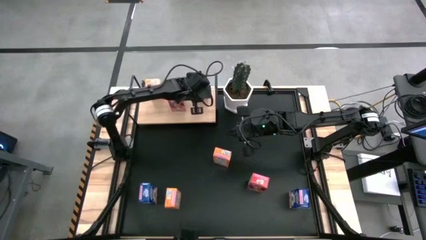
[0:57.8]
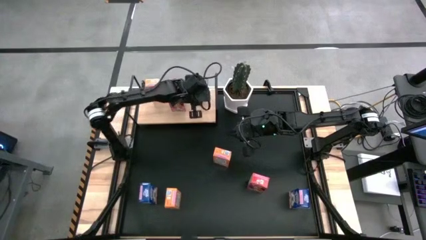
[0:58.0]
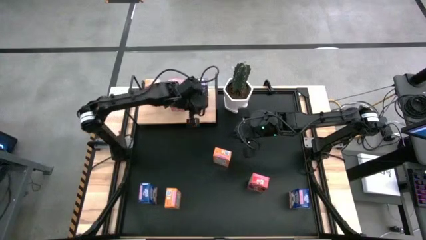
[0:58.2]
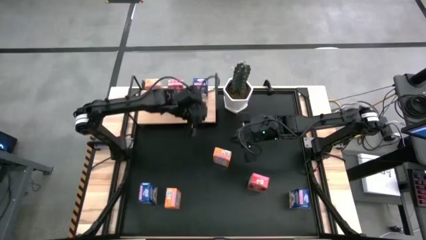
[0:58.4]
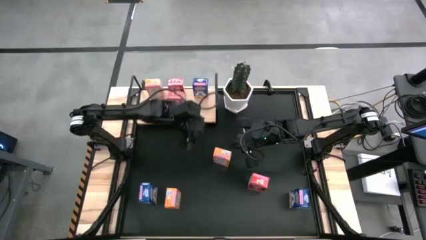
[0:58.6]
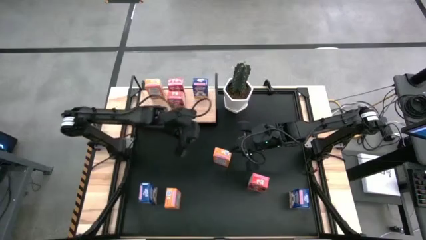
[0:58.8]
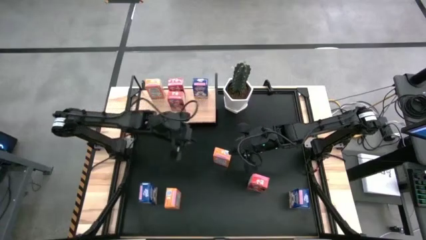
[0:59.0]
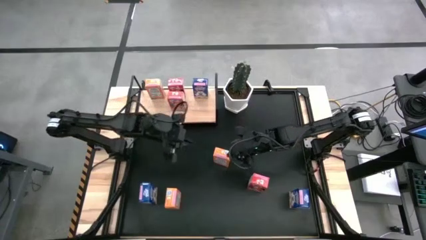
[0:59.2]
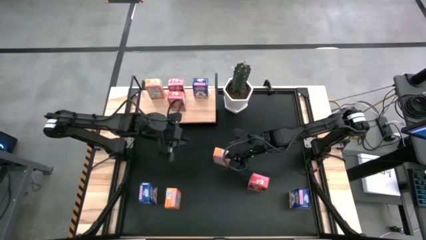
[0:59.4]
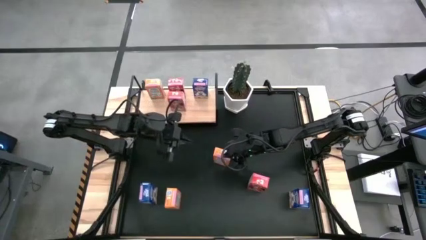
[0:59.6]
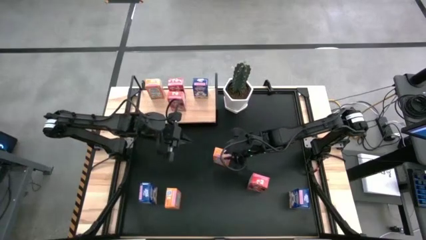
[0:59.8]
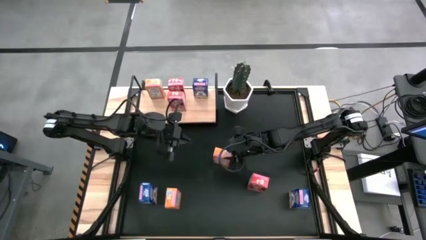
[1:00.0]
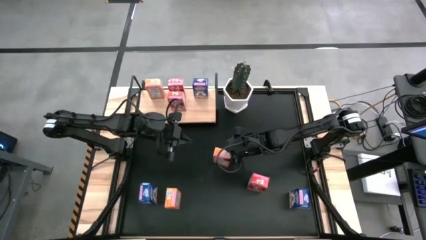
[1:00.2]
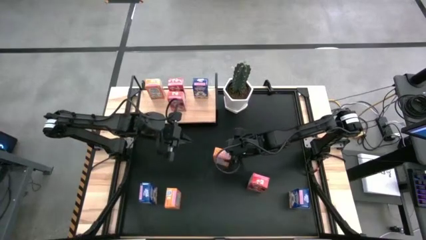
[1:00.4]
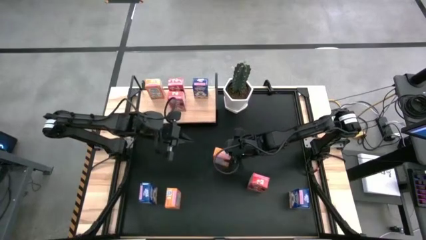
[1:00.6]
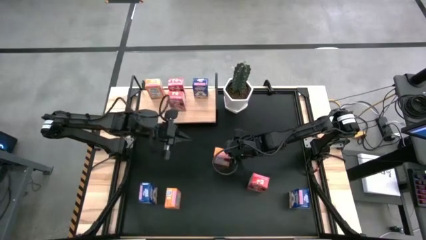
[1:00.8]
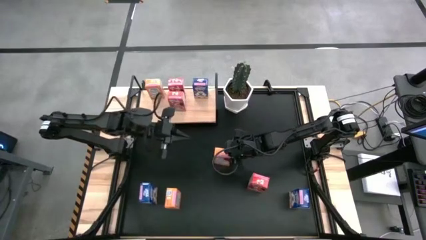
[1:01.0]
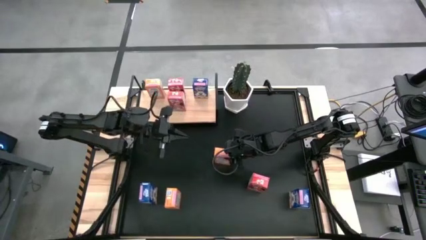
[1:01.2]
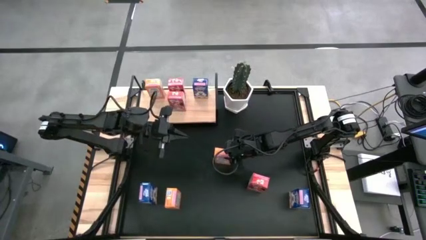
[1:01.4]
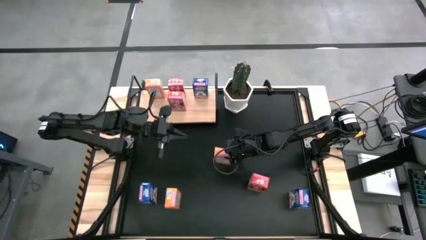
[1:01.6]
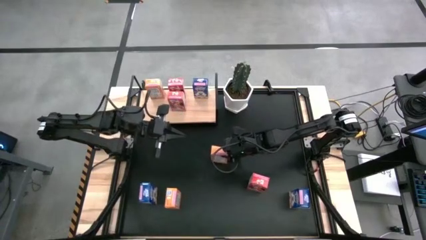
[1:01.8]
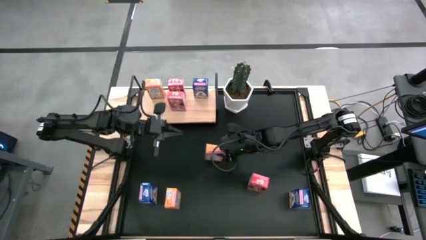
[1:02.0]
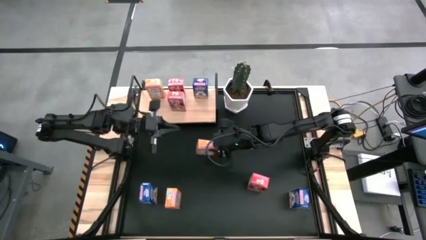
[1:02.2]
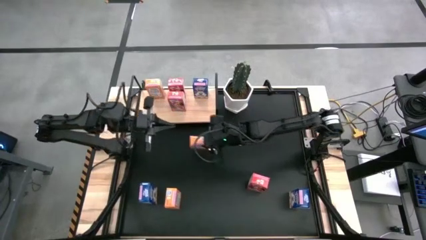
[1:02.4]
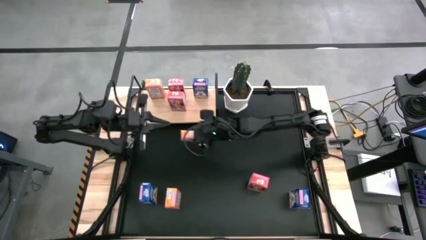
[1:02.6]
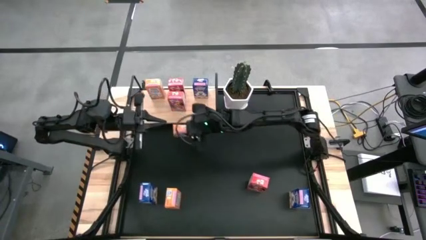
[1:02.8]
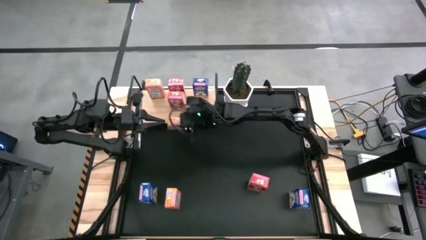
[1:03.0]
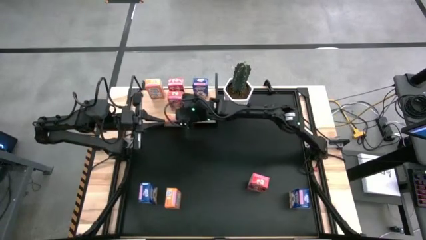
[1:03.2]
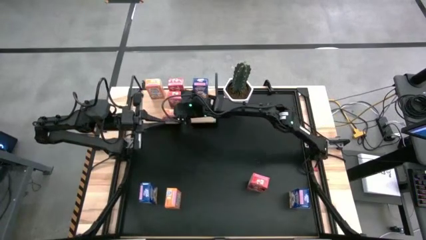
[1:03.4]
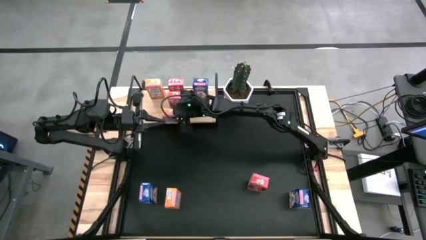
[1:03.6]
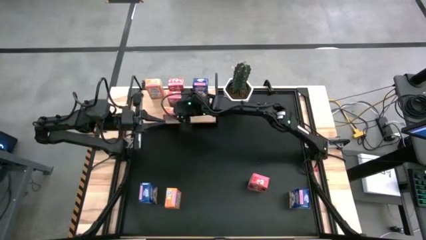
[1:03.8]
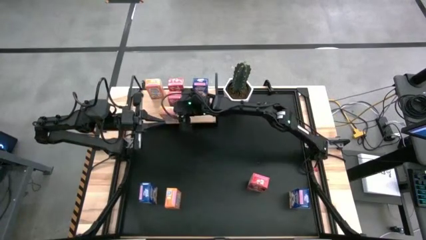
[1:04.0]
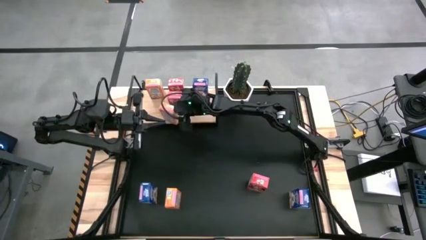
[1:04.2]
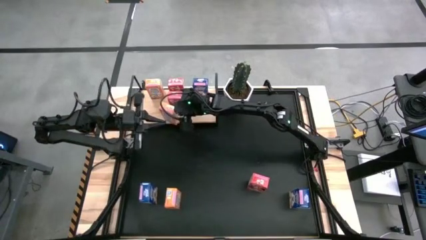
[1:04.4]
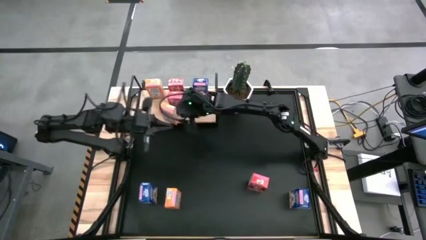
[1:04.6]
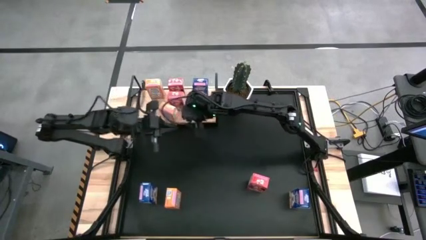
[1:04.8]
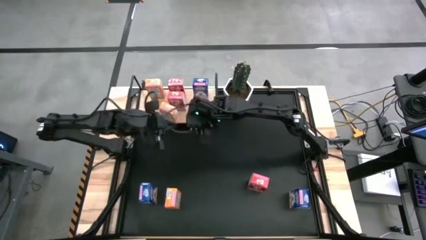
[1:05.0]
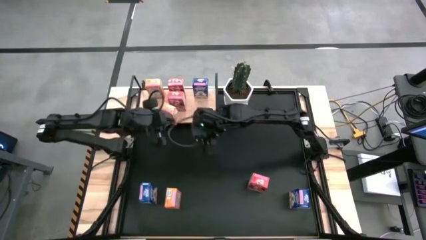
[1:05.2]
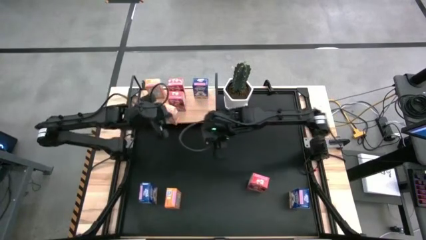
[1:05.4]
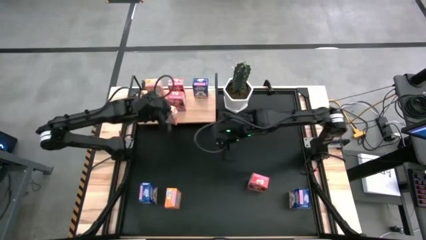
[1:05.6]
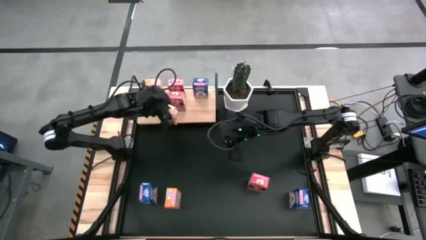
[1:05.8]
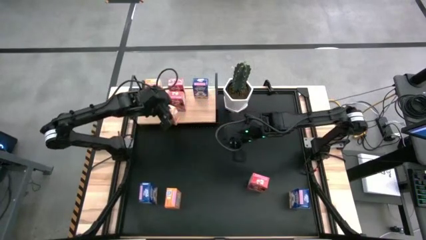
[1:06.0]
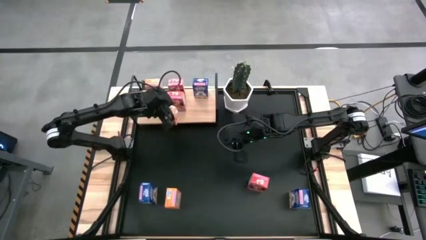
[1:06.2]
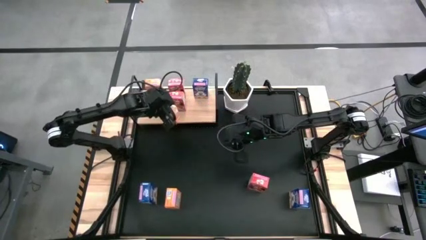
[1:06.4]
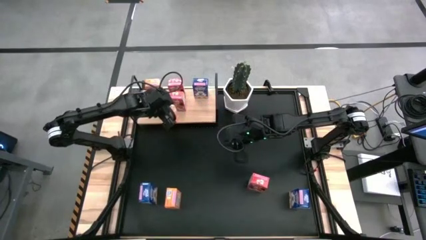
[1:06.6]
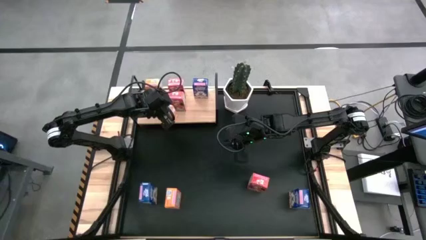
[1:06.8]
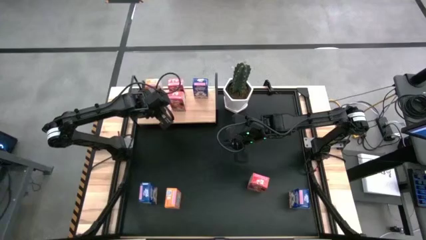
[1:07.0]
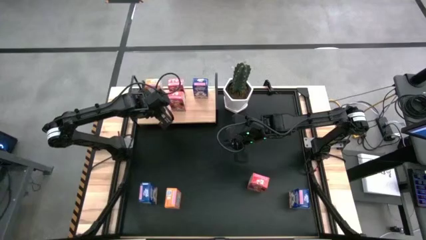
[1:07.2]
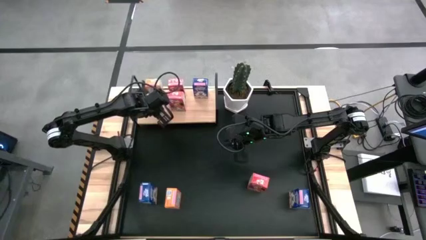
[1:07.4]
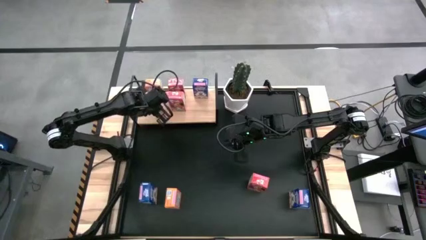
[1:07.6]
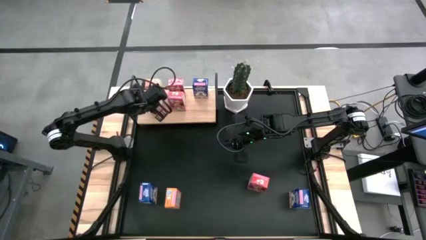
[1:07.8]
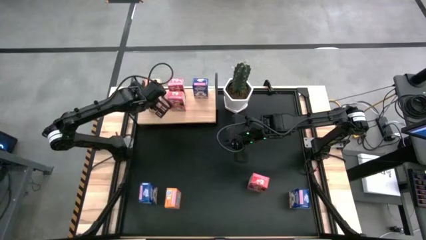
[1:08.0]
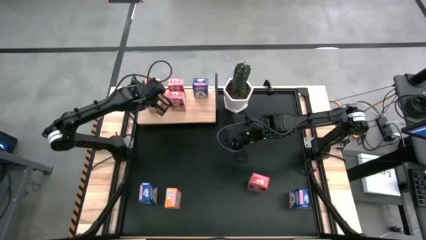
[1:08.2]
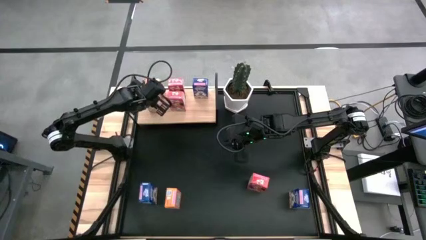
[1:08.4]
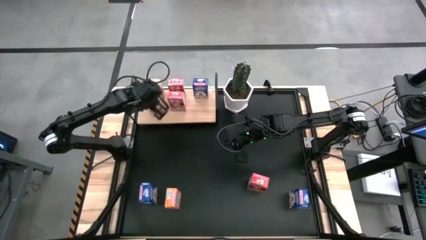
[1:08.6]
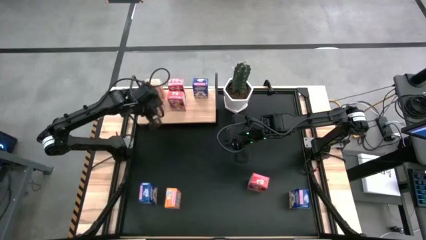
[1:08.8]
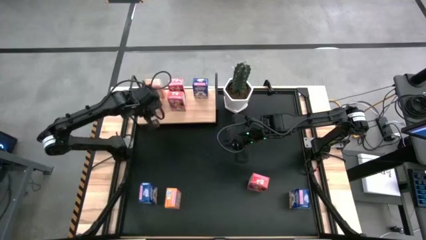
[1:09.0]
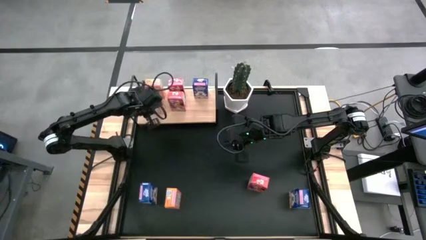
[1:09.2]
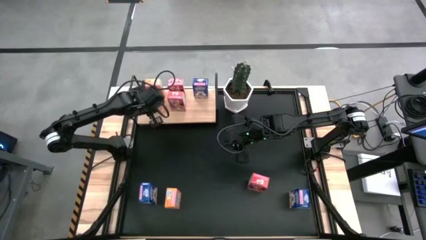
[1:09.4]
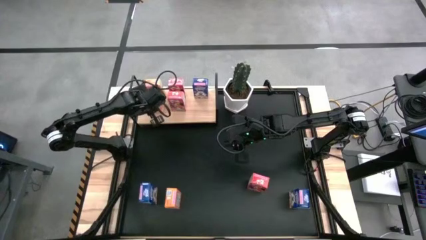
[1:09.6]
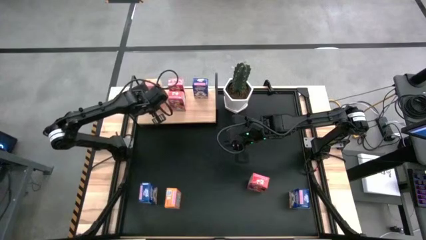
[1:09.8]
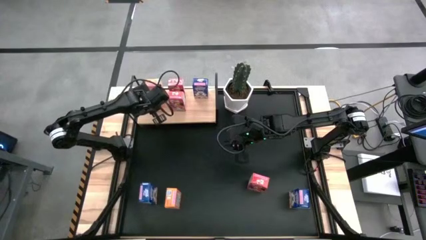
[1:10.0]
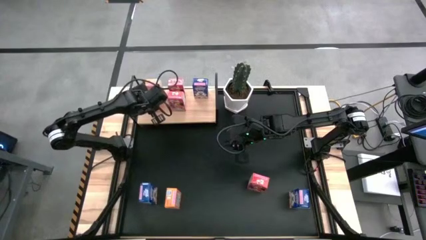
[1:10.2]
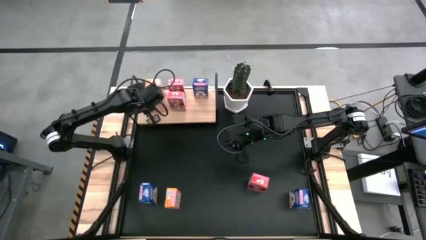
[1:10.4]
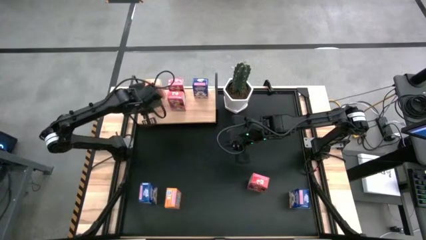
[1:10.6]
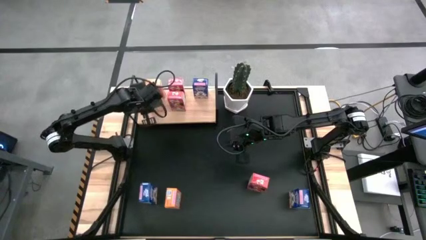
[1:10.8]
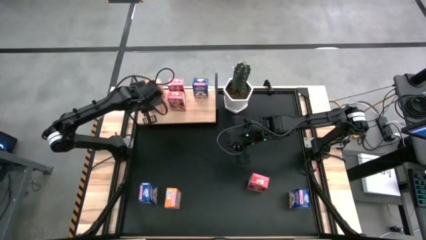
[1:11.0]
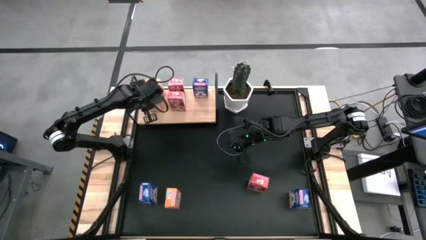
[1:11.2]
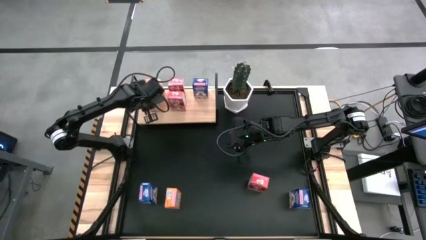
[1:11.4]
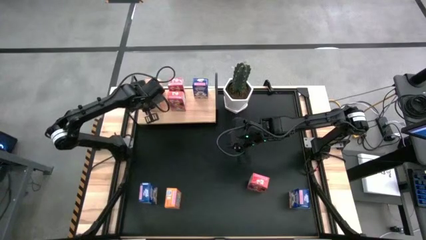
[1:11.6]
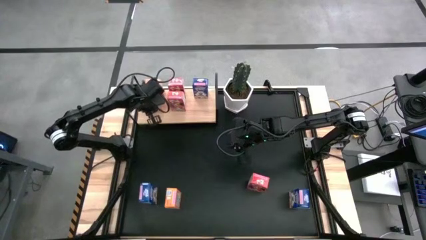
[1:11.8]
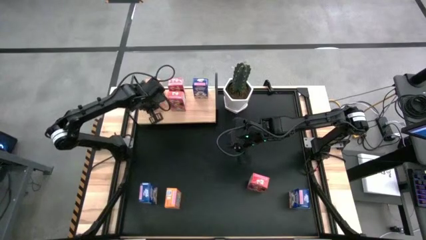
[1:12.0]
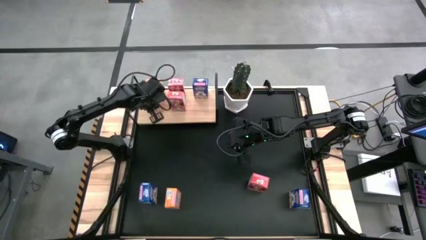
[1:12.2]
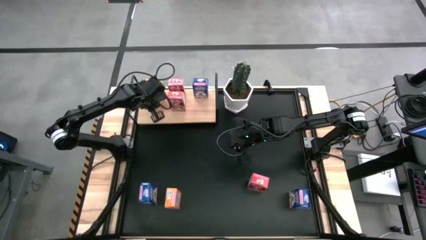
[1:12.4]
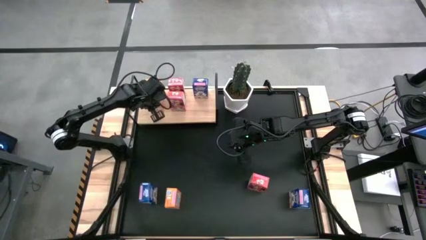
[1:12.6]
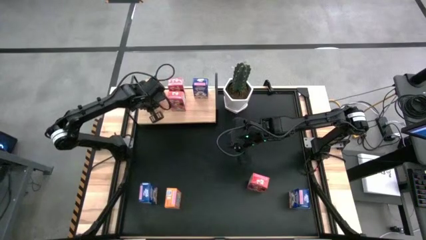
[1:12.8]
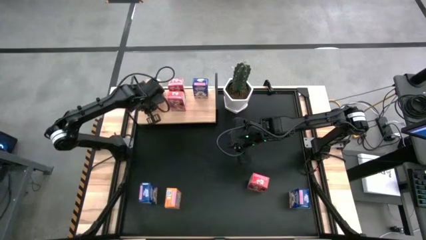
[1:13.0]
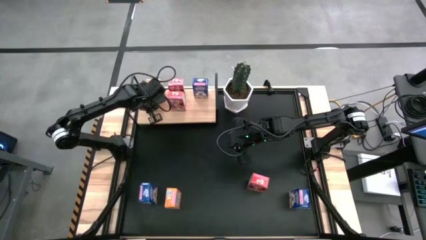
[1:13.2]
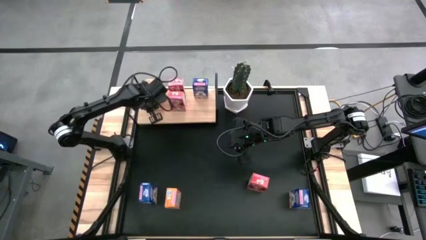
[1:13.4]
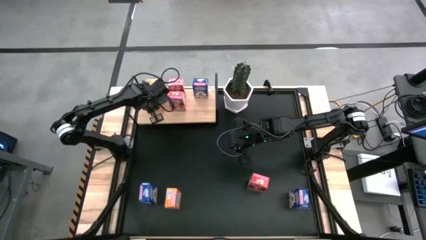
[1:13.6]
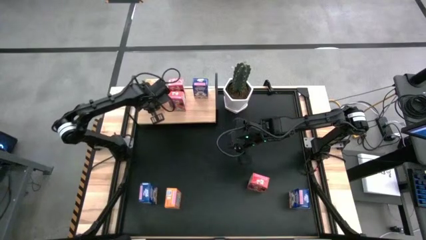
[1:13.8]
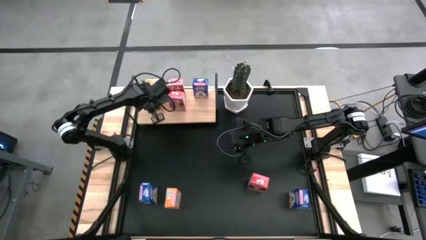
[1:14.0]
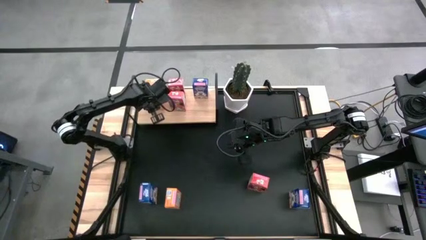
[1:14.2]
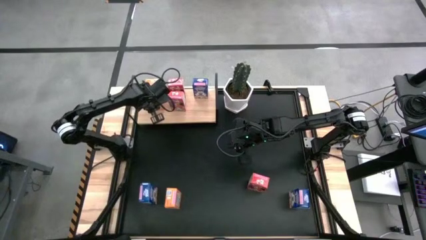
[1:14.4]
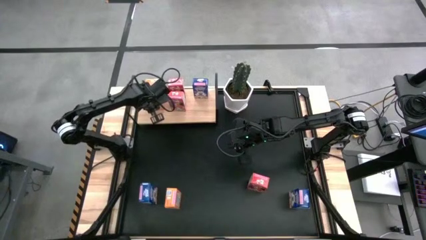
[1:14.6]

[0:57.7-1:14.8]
Task: Stack cereal on shelf
Put the right orange cereal box on the shelf and align it with the other orange cereal box
